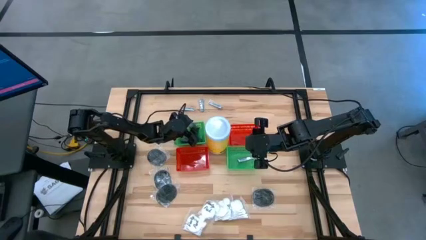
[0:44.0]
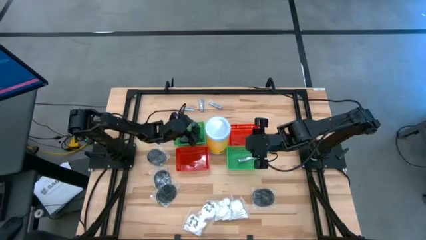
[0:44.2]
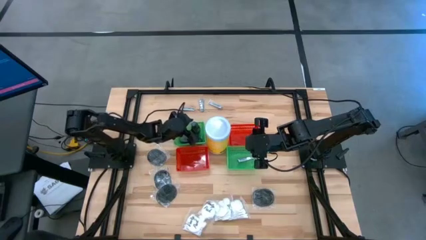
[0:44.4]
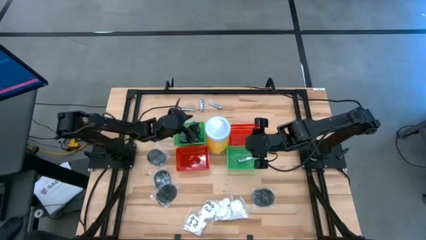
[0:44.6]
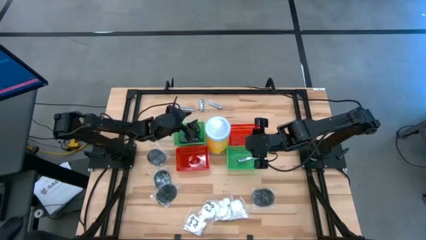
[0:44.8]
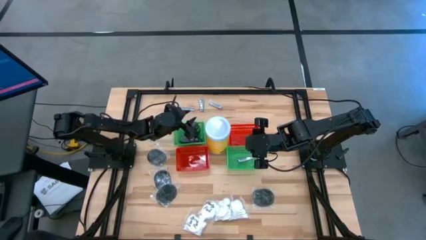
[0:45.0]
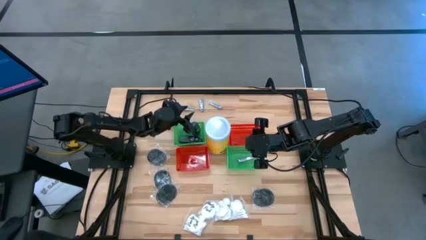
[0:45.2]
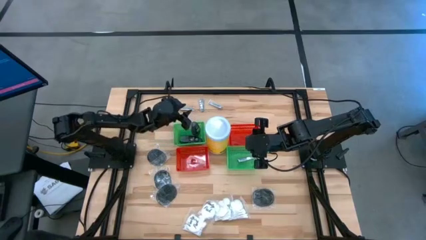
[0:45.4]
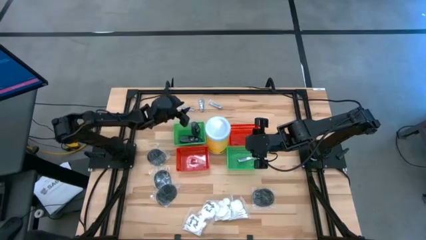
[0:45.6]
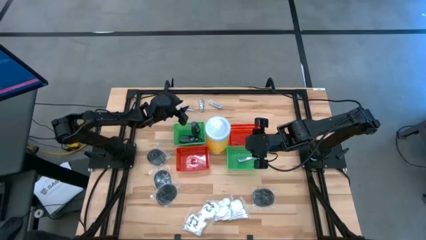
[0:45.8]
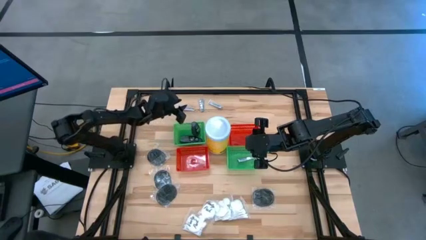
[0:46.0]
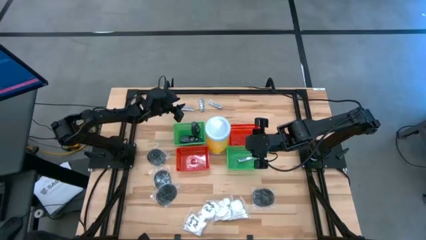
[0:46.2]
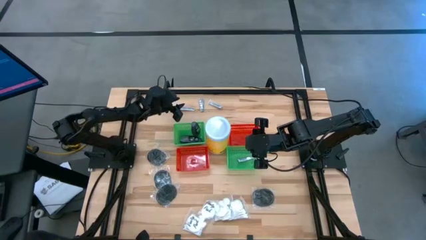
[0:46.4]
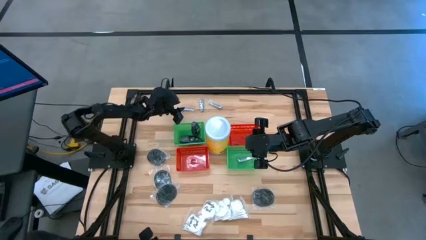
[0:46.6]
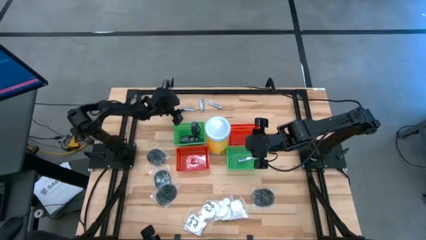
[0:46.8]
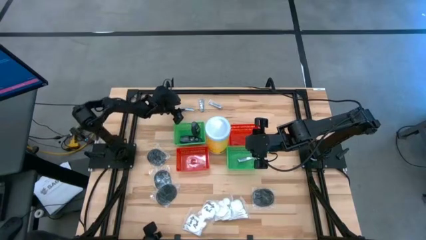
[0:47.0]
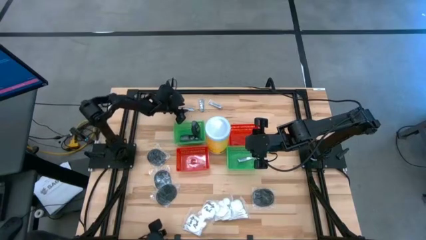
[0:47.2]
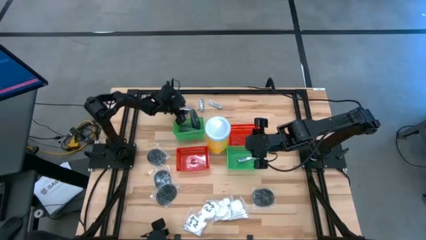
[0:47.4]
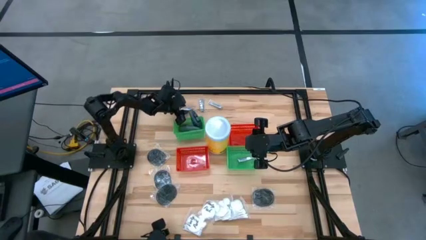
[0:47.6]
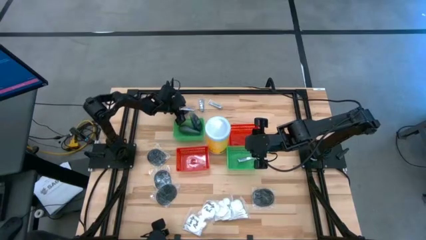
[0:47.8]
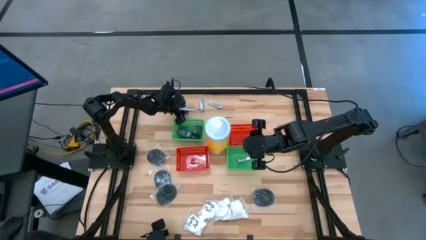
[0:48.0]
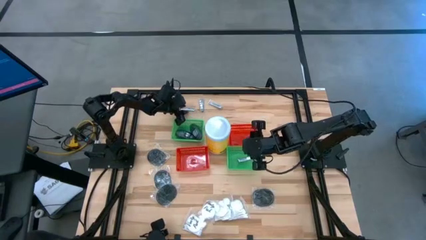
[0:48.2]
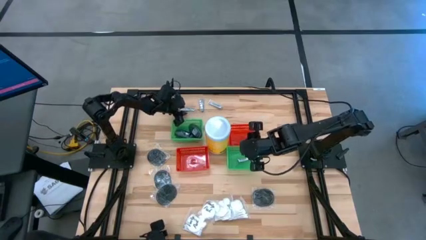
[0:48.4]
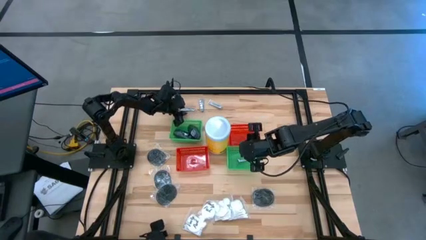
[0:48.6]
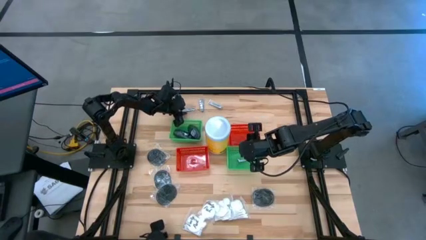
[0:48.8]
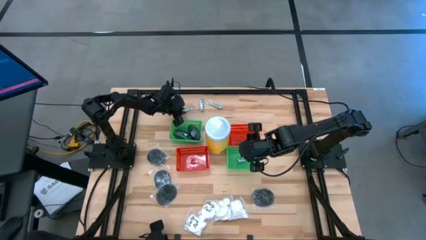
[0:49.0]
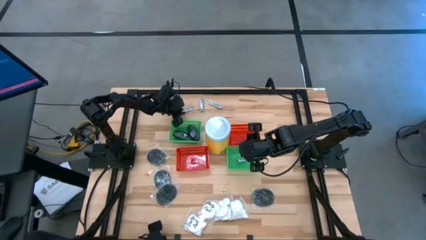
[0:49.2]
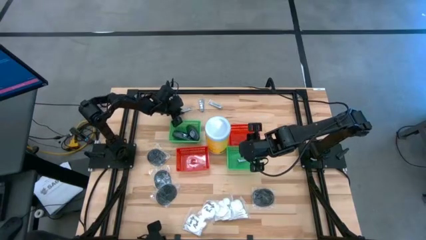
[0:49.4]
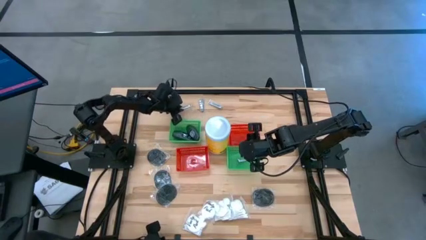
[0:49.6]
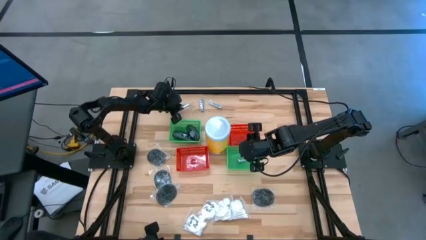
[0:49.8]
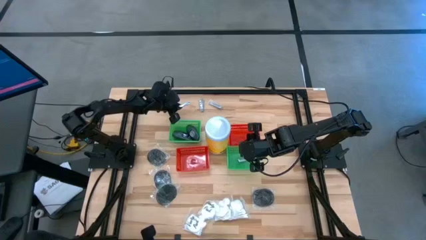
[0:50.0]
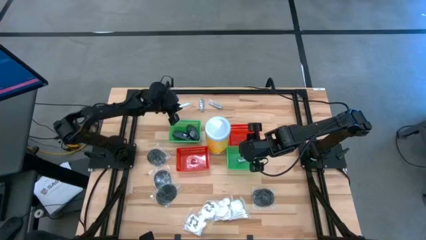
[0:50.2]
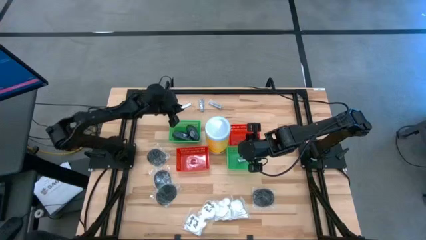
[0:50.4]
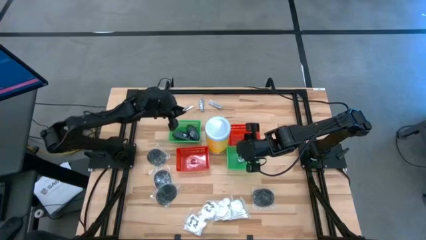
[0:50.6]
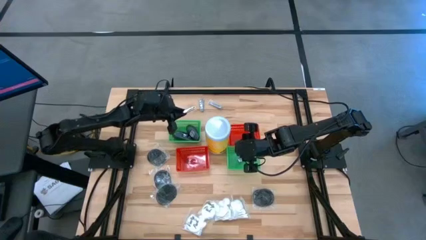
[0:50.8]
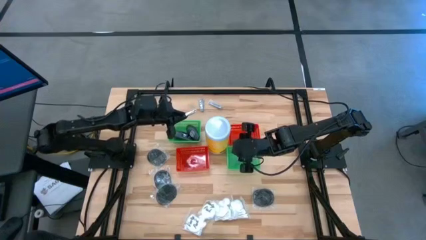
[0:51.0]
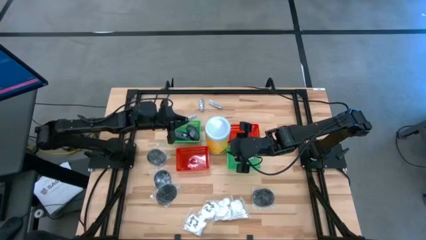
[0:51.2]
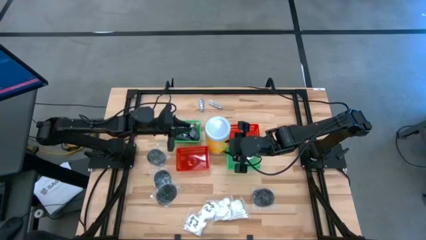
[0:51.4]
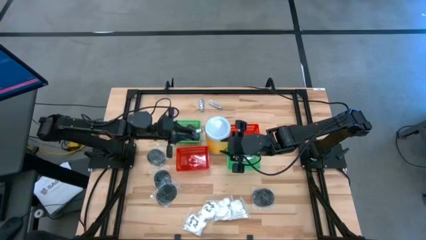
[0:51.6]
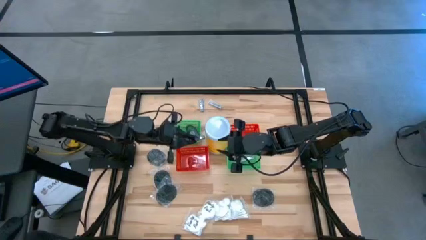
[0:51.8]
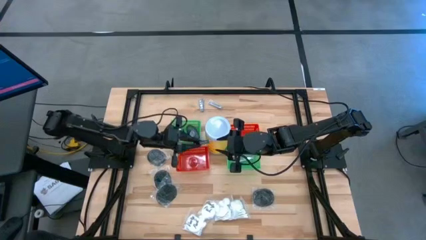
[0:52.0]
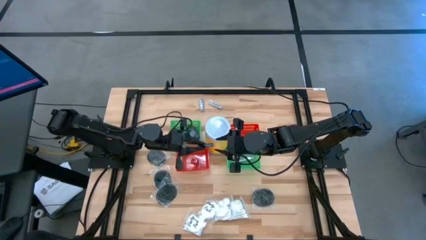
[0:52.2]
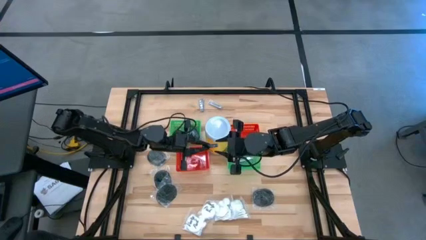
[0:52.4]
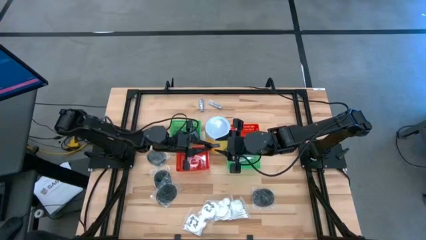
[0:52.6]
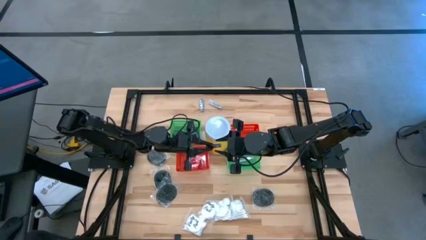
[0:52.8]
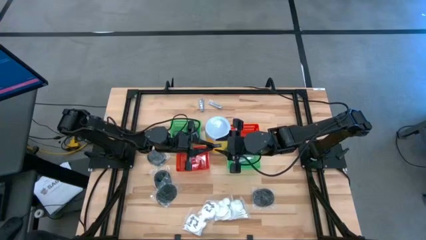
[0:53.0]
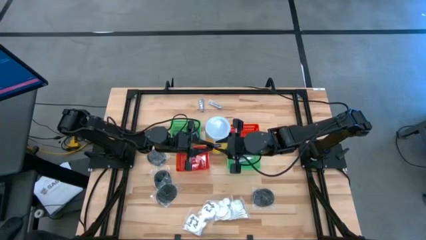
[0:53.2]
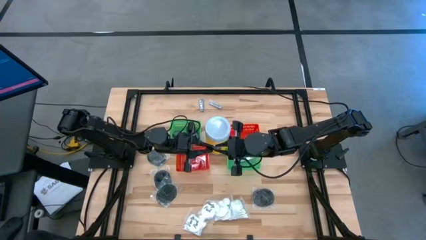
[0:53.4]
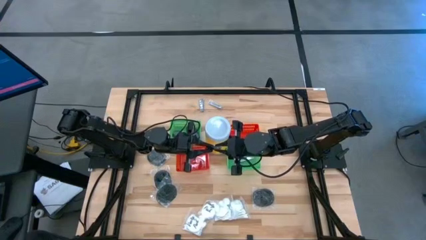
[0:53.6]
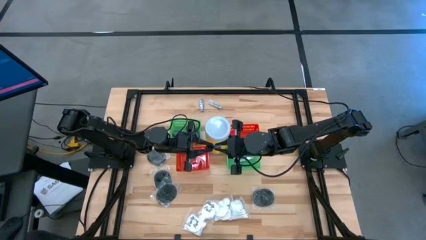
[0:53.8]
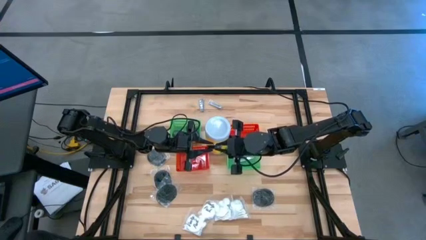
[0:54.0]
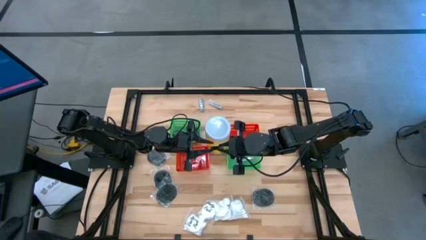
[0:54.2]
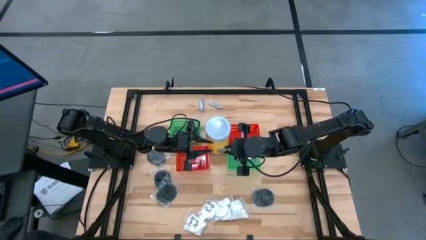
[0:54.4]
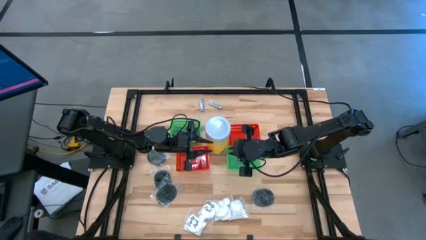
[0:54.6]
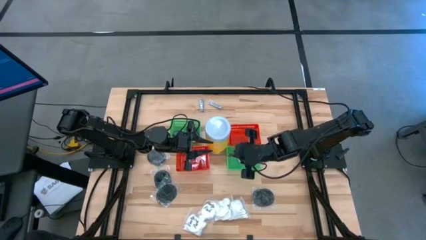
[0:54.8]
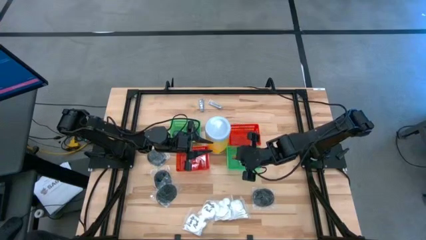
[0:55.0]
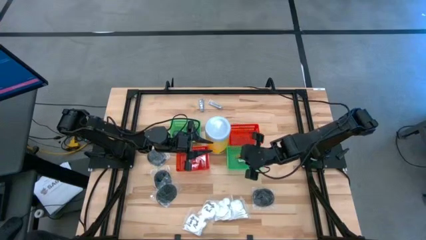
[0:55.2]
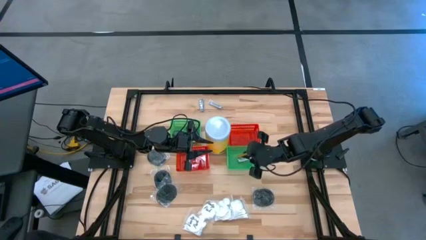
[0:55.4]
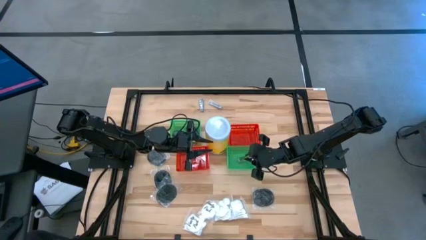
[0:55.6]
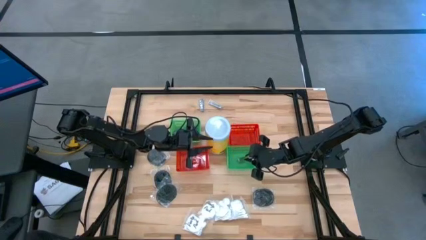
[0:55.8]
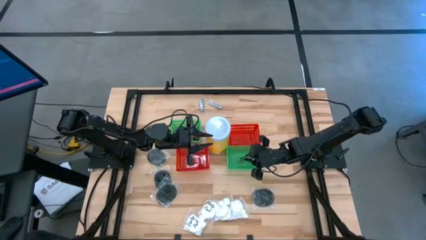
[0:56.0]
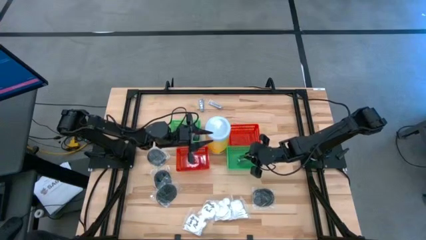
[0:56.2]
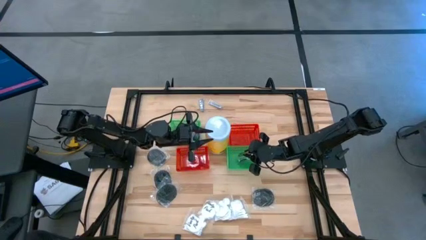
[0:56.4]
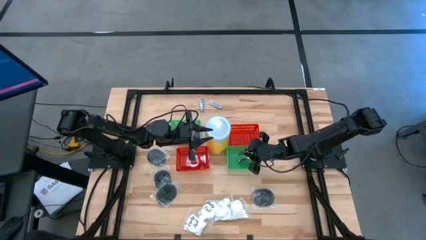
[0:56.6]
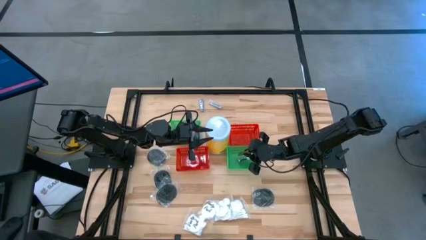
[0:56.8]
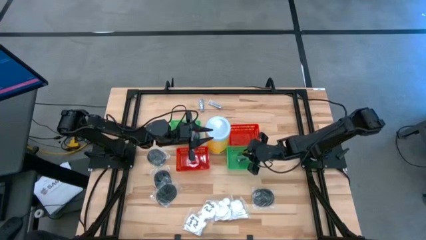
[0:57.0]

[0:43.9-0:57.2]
Task: Pick & Place Travel size toiletries
Put the silver nail cutter into the right green bin
